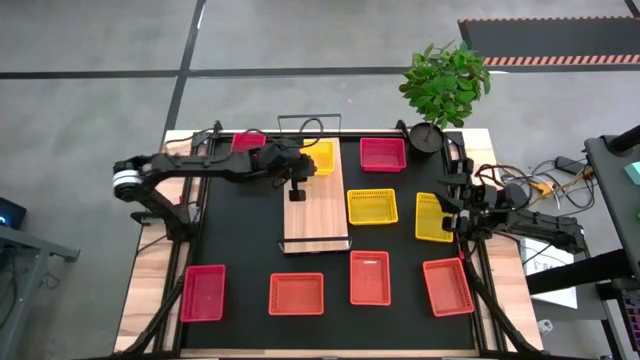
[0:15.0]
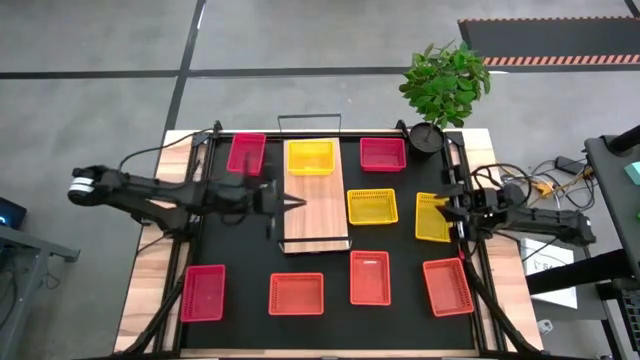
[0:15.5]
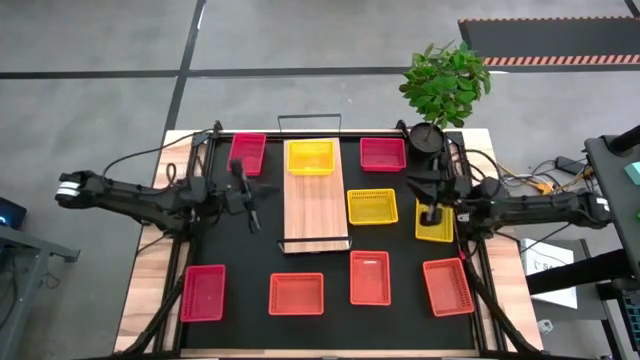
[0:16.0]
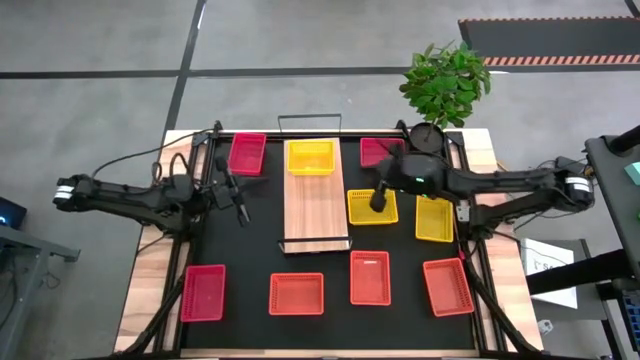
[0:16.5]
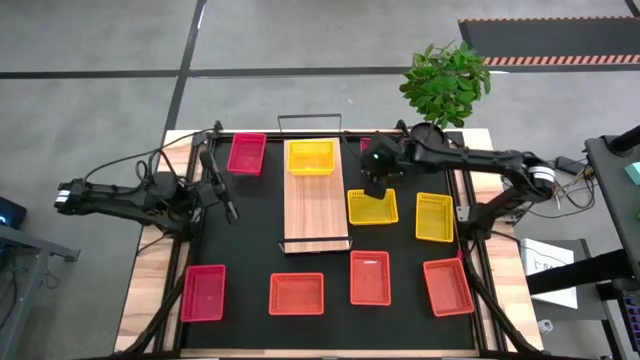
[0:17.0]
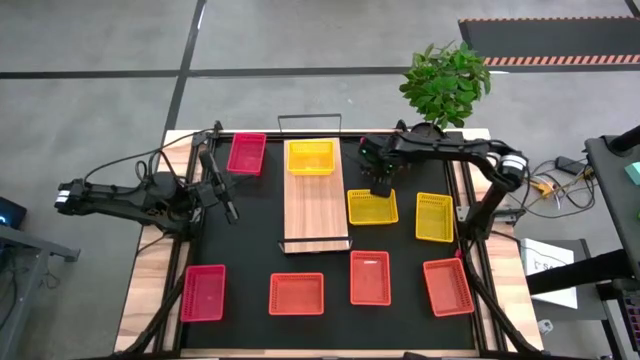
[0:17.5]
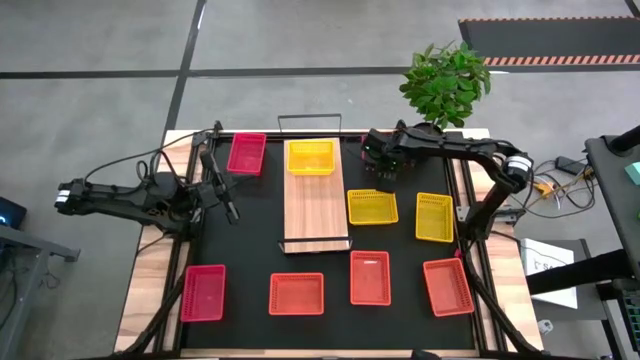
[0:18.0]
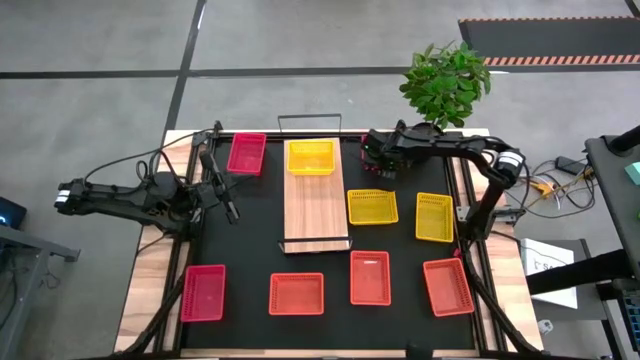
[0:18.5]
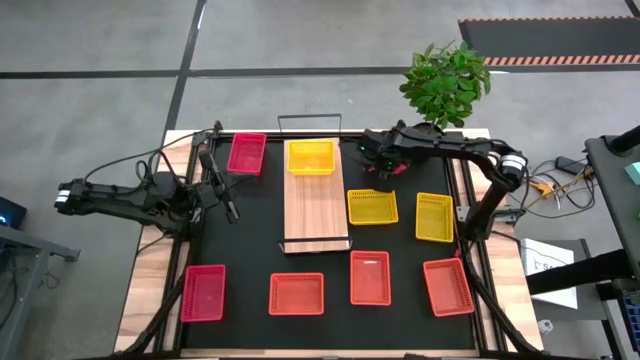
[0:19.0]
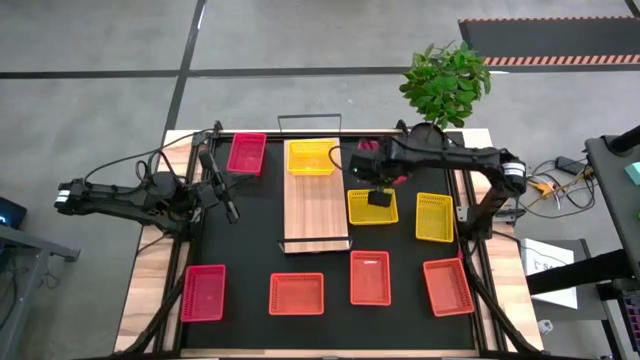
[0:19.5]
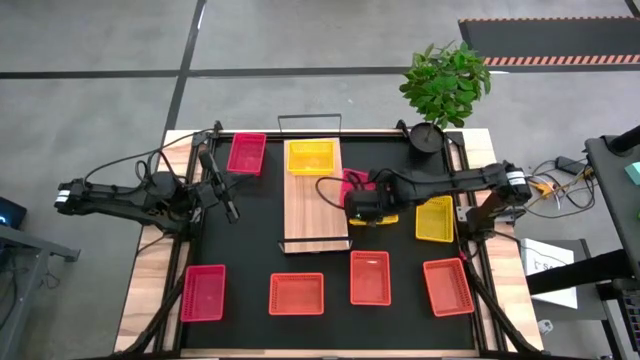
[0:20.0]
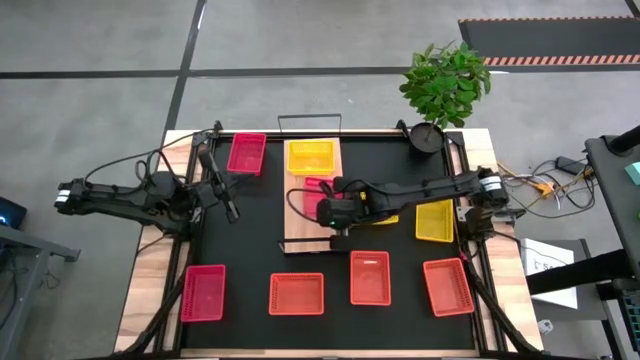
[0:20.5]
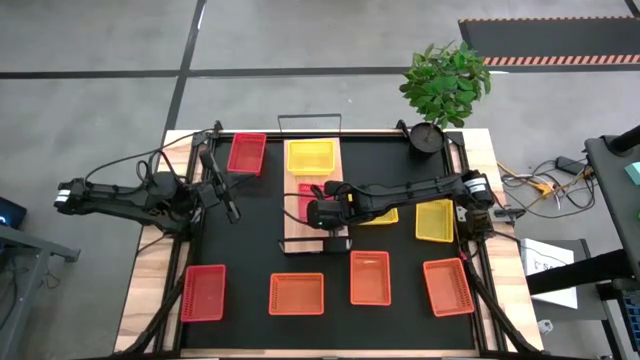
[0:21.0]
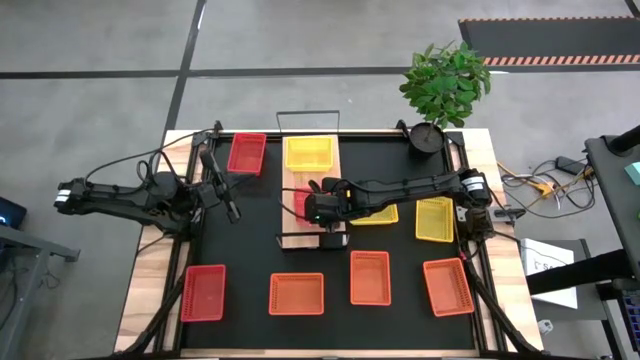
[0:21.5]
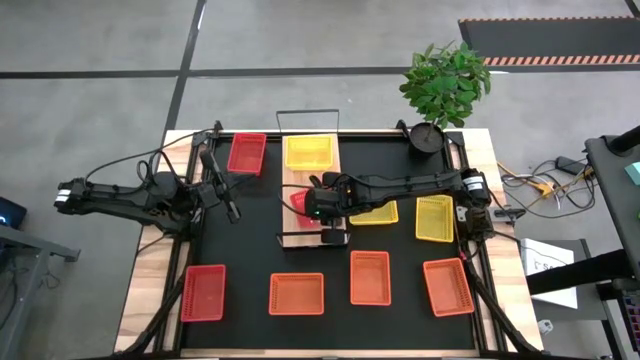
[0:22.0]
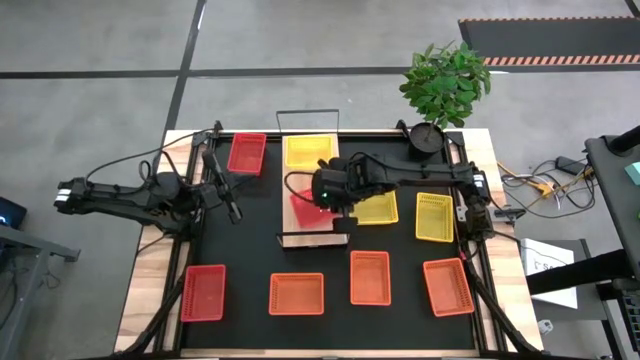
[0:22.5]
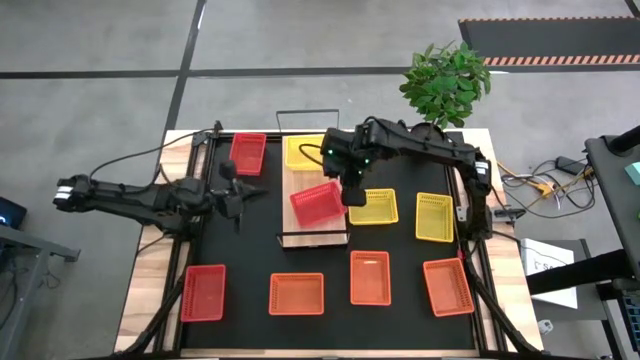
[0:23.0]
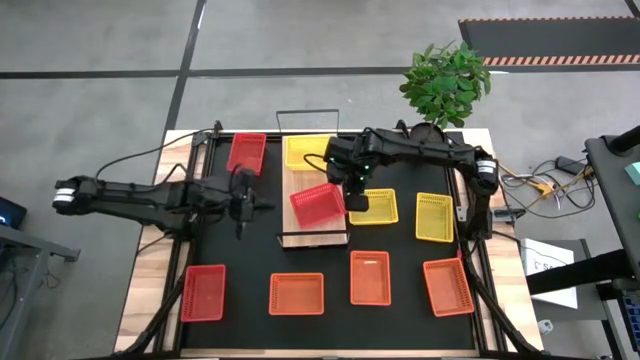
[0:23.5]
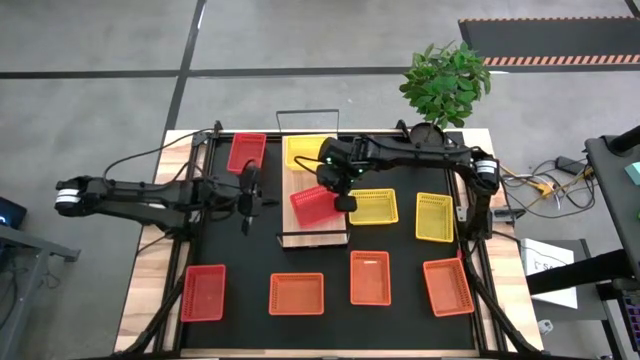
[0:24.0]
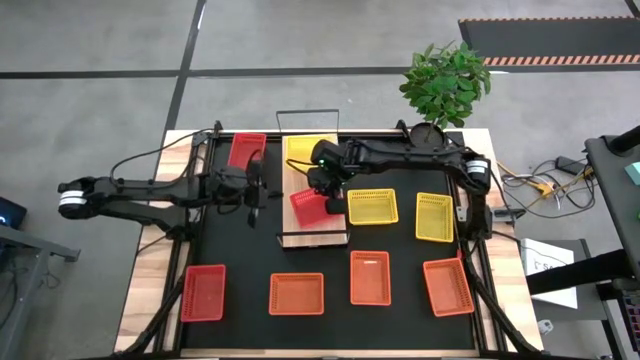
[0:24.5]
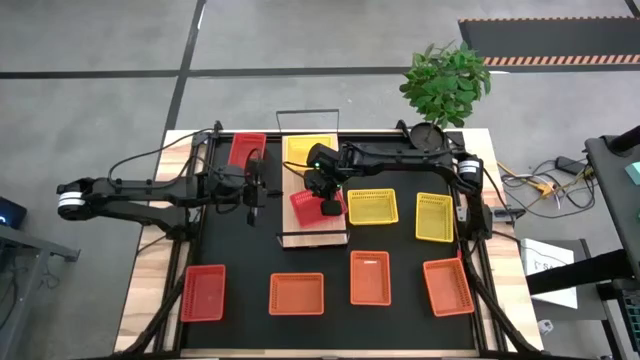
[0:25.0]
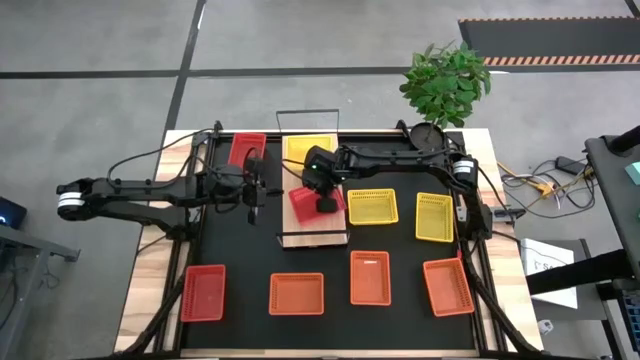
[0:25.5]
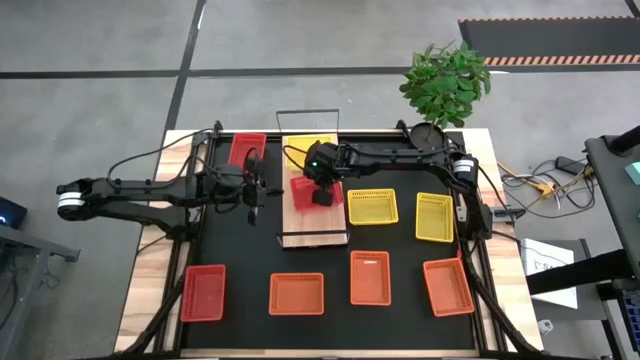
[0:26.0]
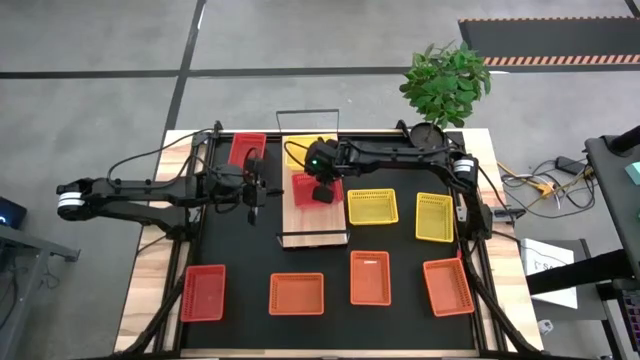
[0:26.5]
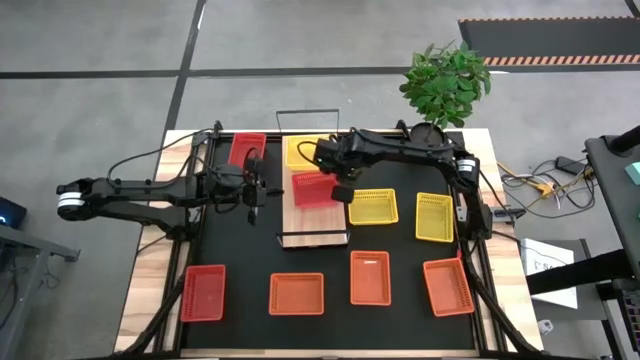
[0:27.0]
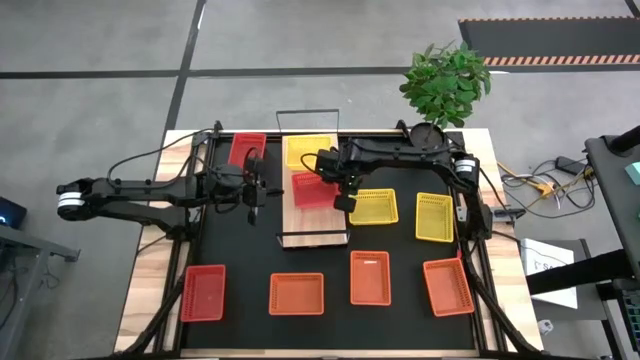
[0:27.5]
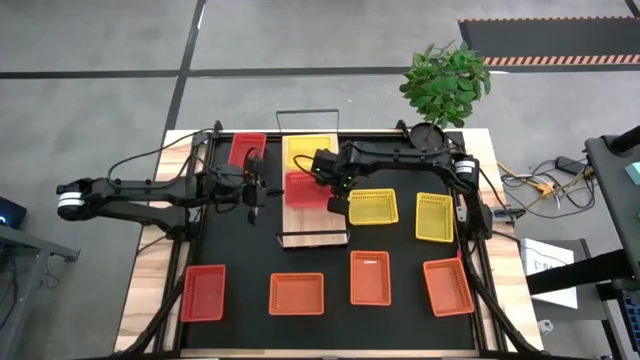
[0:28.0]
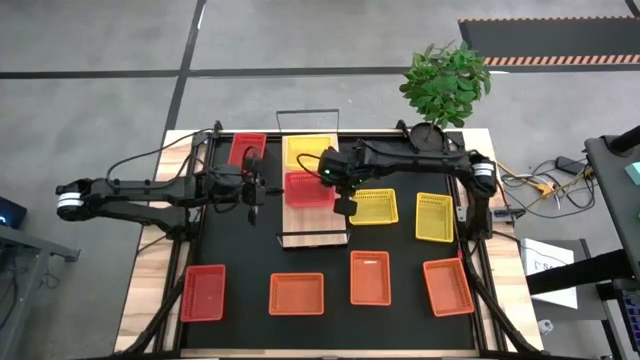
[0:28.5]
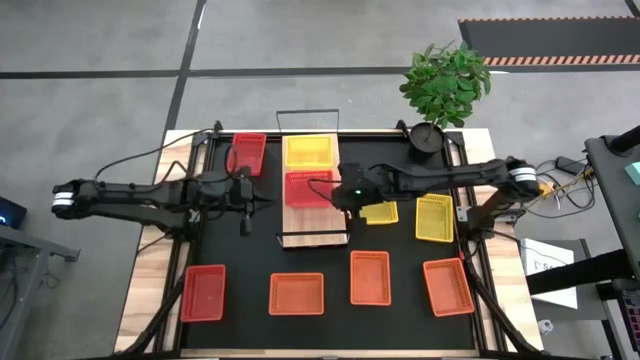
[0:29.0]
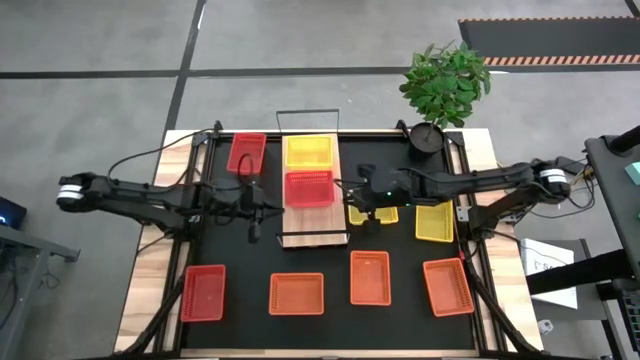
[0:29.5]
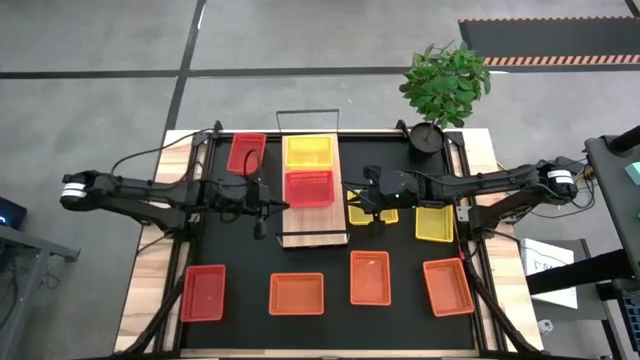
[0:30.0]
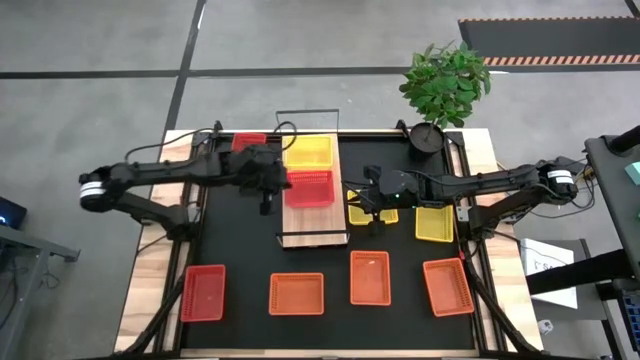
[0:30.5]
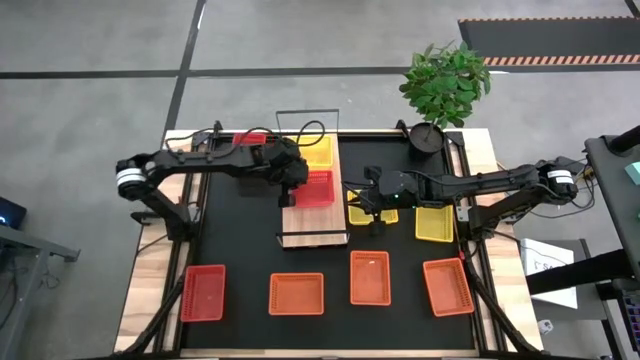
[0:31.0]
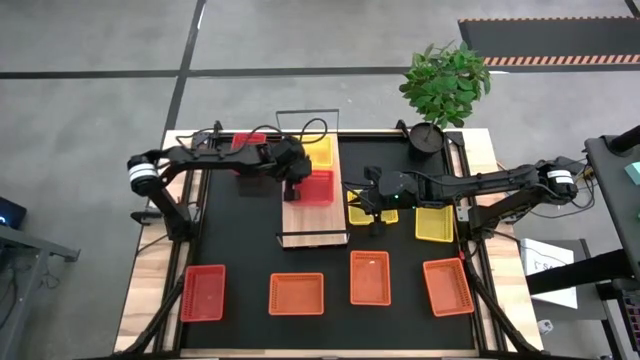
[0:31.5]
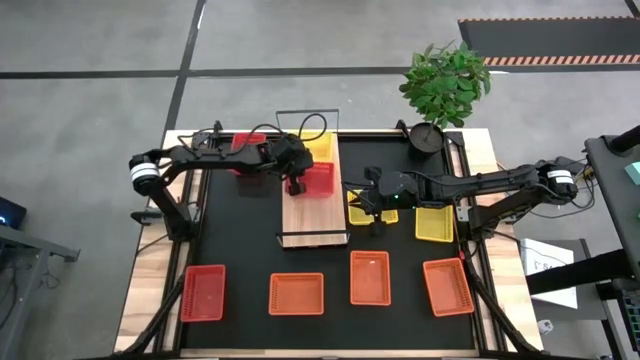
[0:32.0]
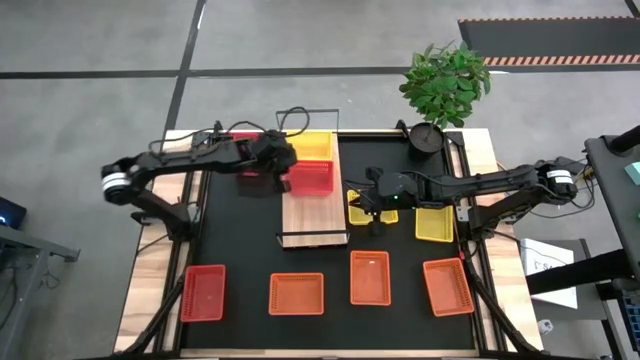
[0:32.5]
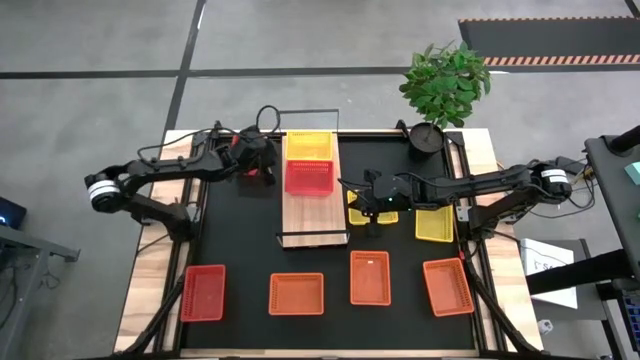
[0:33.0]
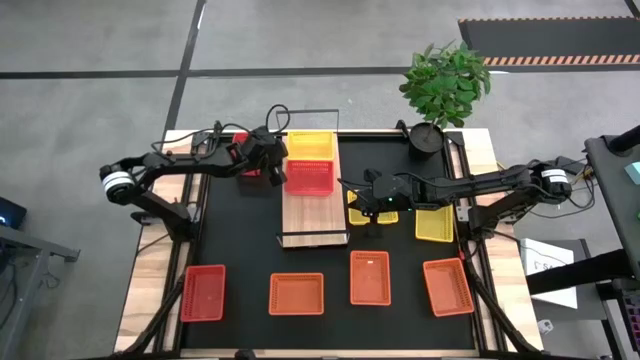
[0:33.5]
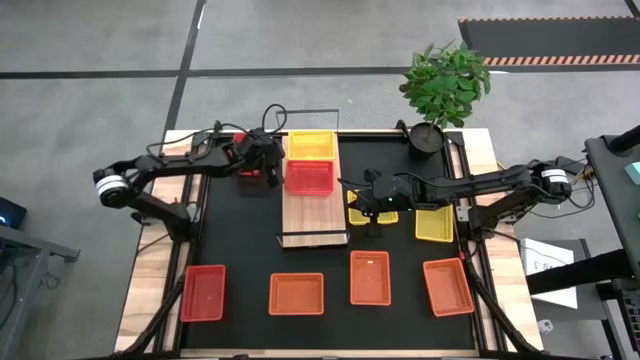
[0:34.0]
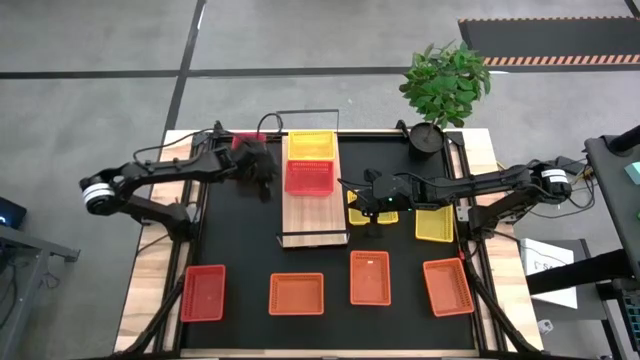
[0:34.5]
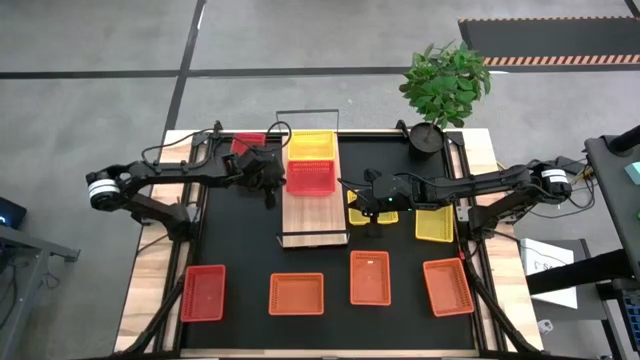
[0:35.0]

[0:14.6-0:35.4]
Task: Stack baskets on shelf by color
Put the top right red bin on the shelf
